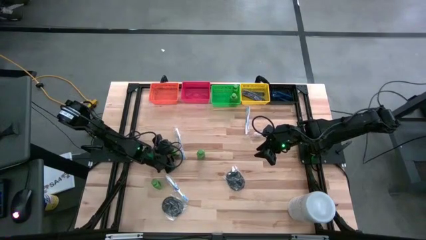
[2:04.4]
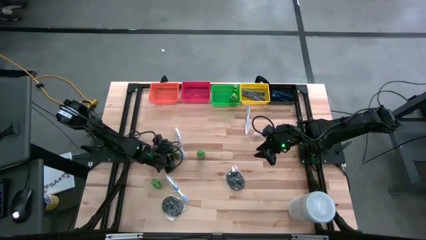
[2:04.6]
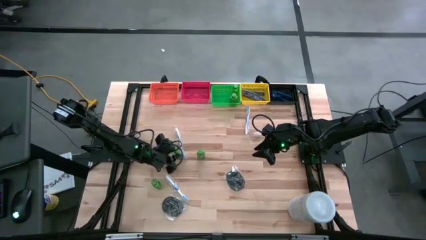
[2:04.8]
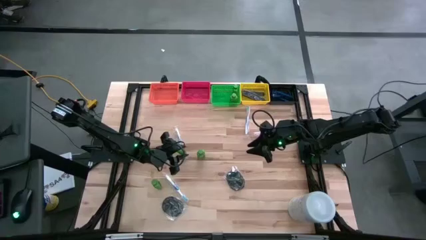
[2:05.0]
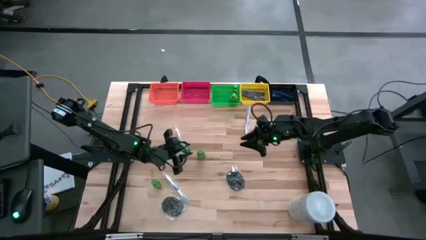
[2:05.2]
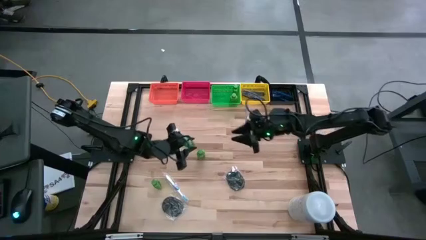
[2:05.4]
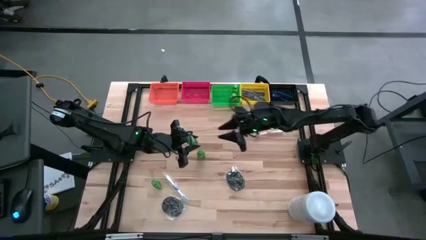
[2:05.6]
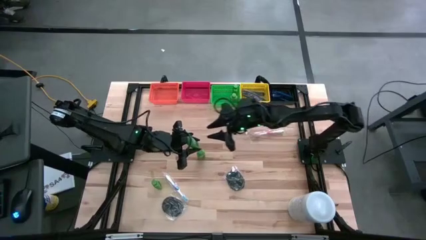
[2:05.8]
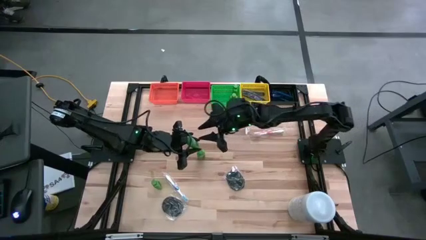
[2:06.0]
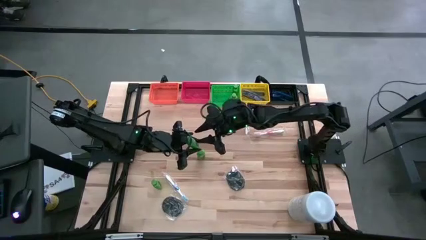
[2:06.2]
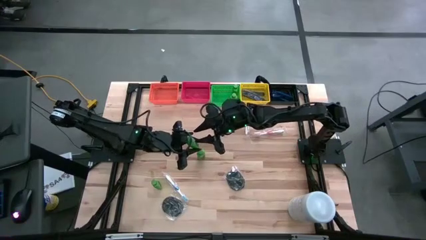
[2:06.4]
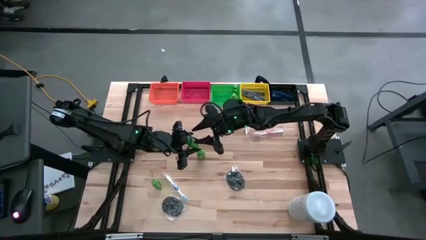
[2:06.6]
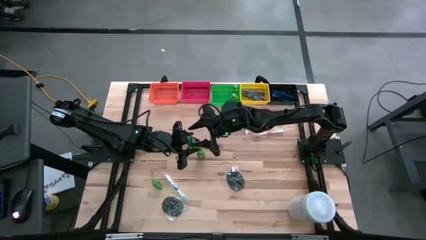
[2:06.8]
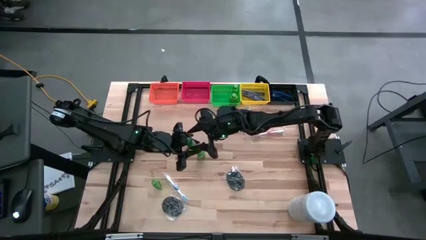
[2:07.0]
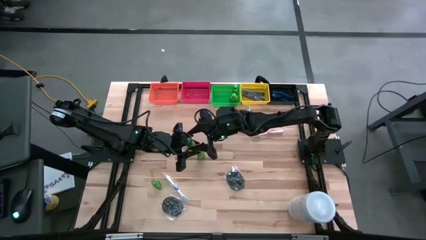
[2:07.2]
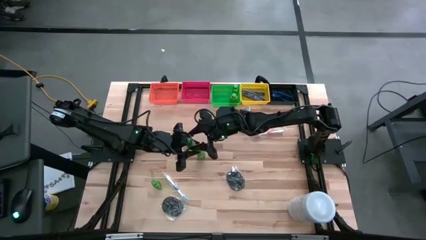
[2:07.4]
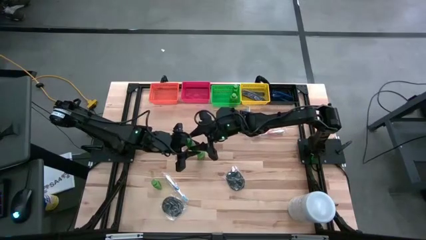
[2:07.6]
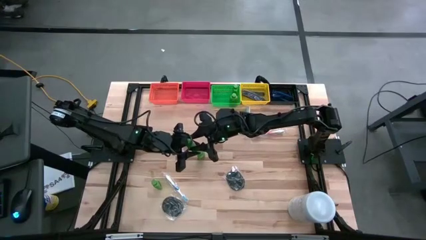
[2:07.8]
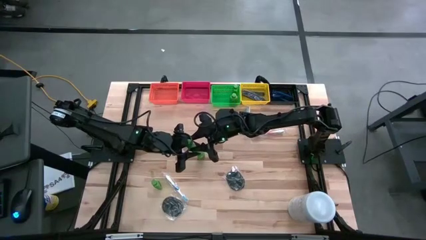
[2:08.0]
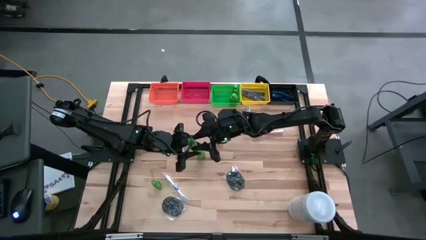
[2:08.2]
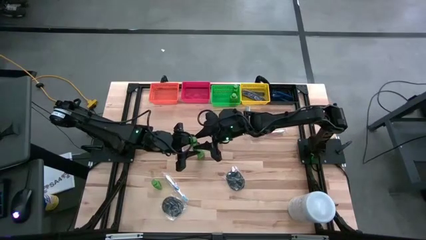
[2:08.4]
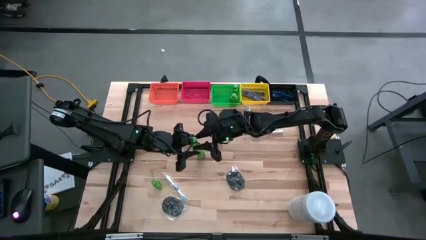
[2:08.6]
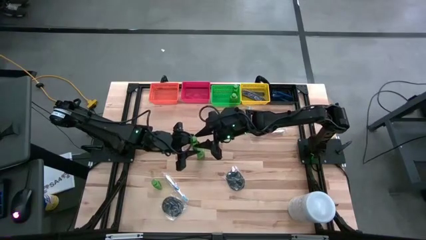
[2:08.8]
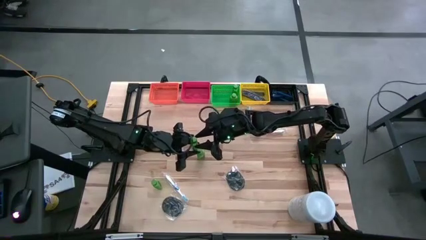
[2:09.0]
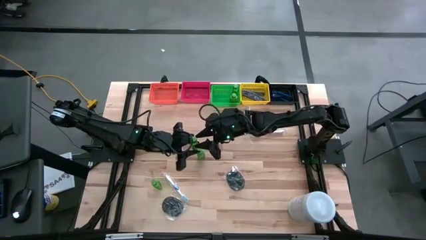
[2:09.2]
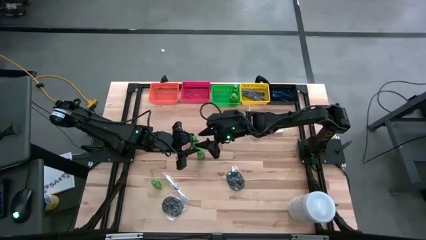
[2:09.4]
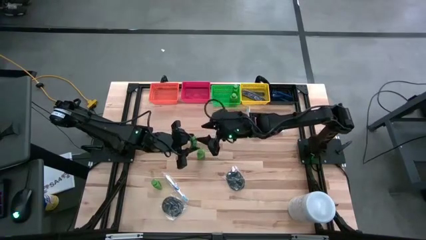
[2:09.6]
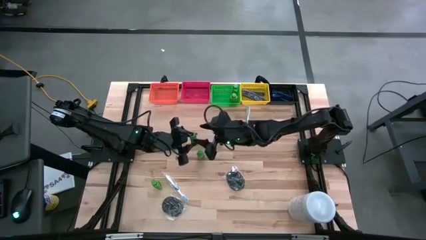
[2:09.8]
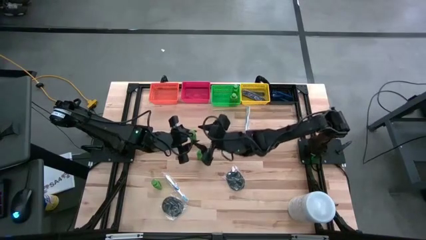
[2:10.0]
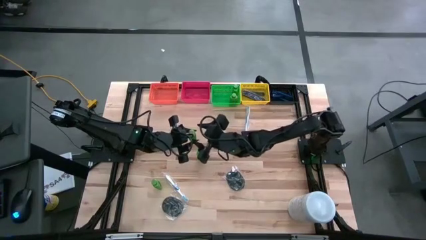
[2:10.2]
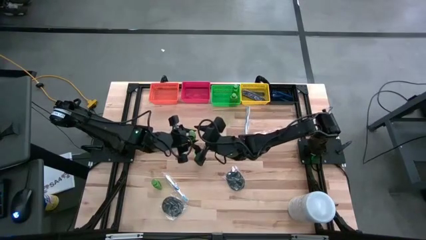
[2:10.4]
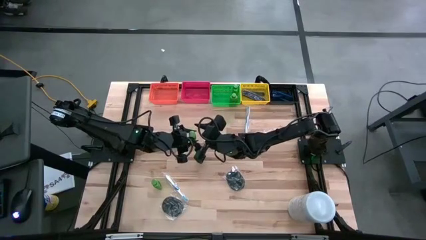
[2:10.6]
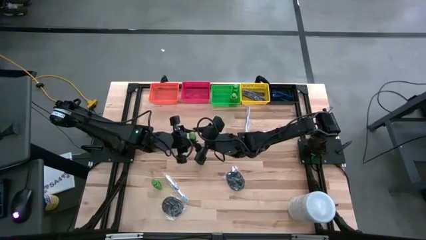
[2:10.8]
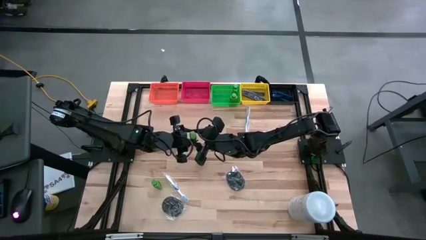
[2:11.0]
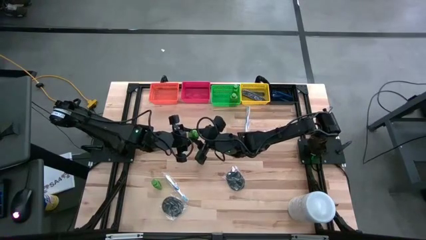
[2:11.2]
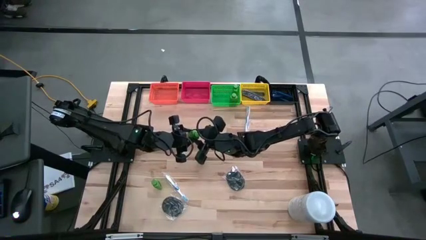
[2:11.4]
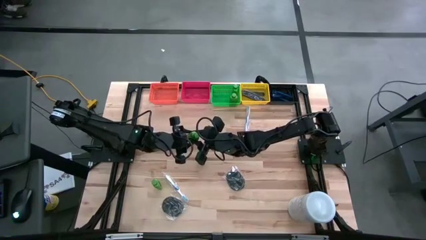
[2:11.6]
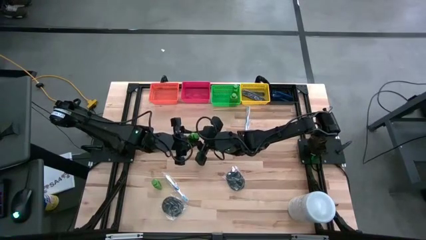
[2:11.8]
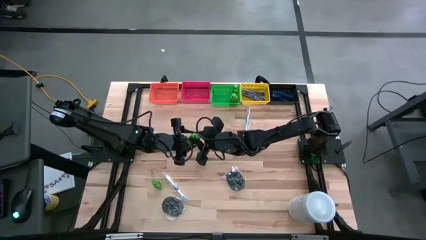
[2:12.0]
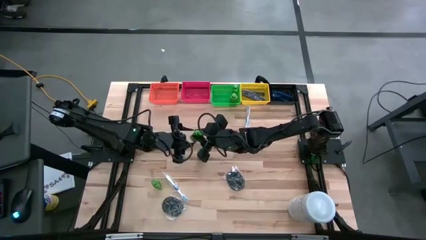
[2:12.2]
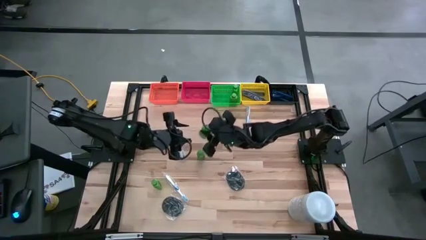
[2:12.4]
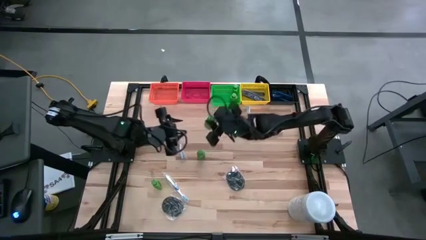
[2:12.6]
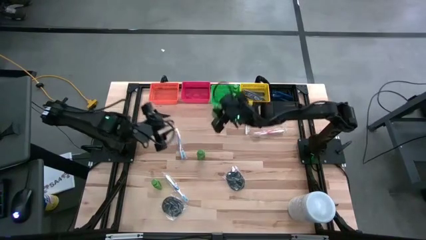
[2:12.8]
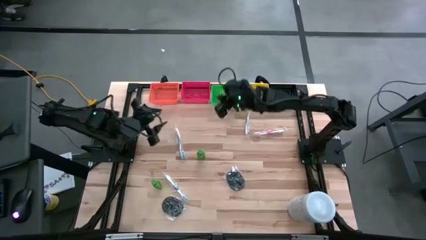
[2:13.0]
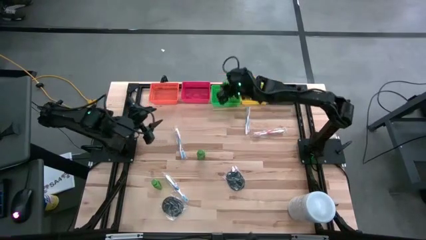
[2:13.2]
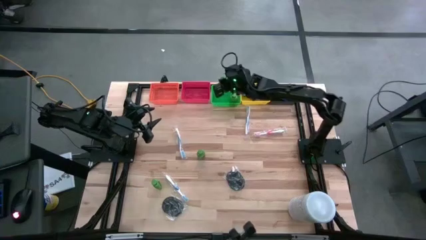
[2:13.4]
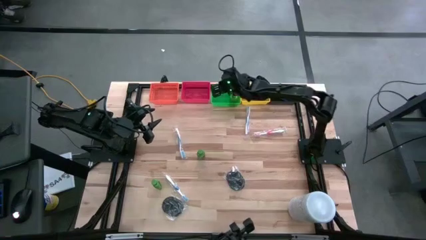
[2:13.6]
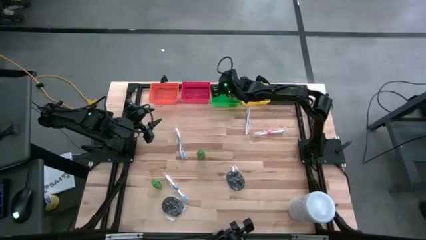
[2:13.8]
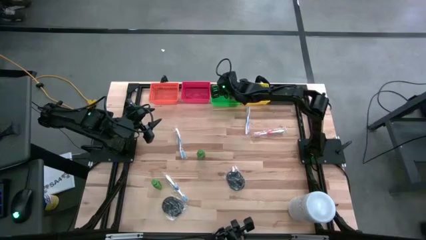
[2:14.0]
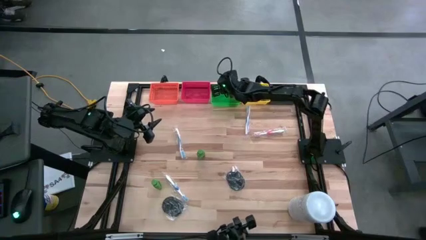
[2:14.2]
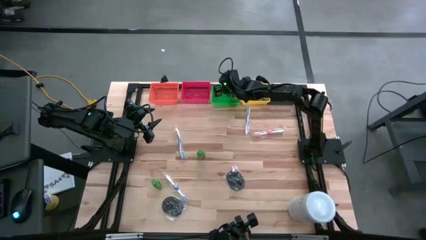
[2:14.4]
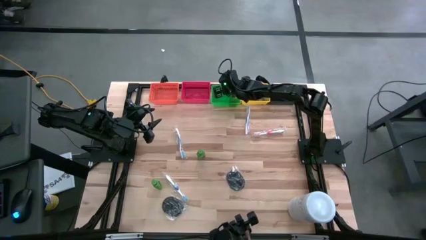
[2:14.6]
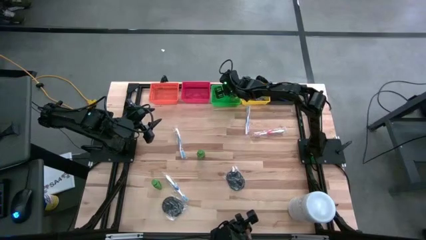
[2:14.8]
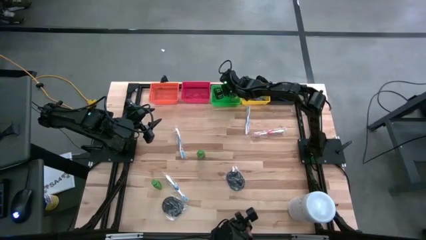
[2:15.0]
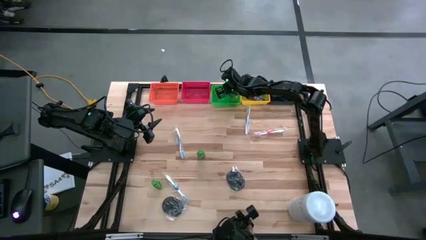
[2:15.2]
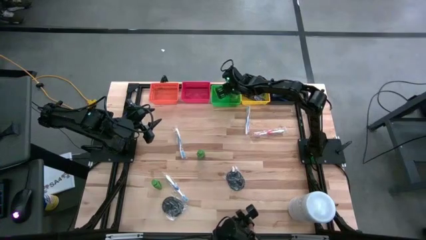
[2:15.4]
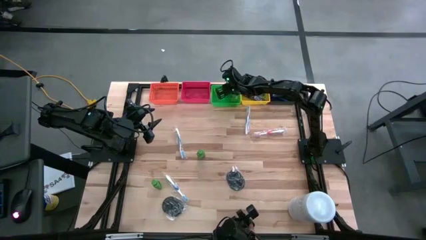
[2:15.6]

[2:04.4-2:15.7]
Task: Pick & Place Travel size toiletries
Put the green shampoo into the green bin

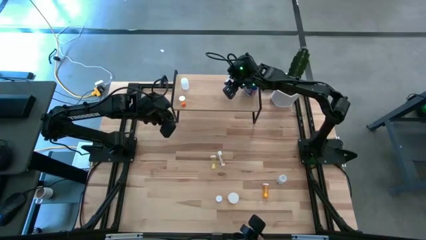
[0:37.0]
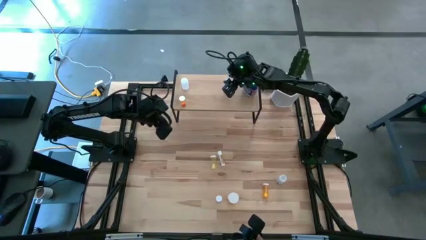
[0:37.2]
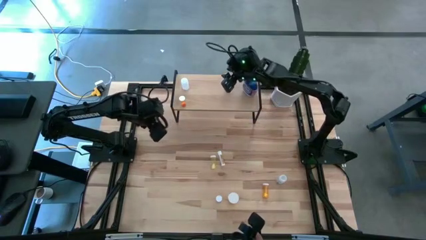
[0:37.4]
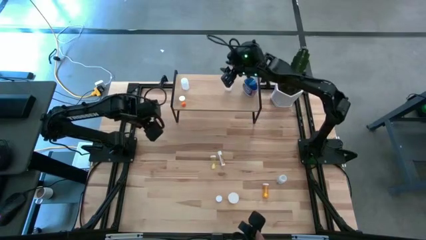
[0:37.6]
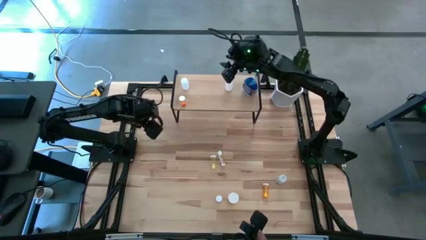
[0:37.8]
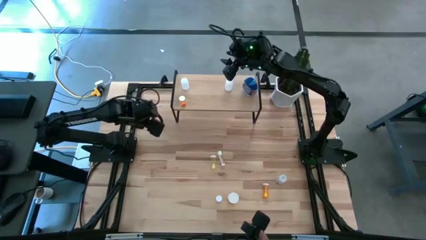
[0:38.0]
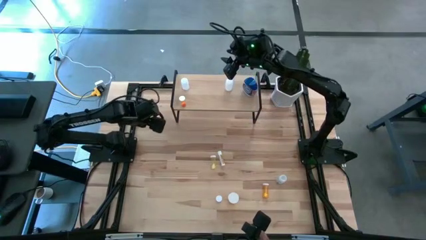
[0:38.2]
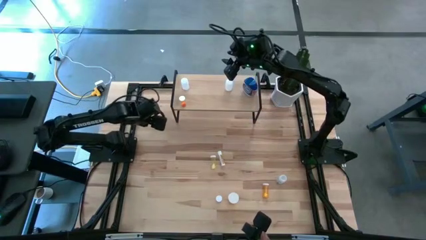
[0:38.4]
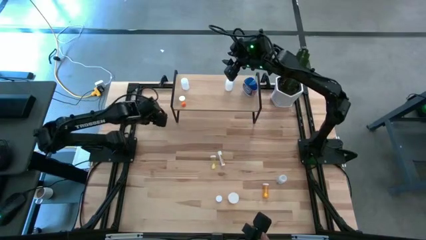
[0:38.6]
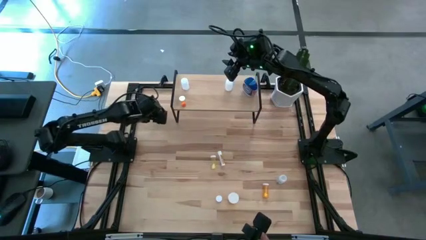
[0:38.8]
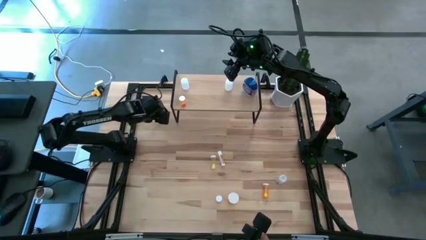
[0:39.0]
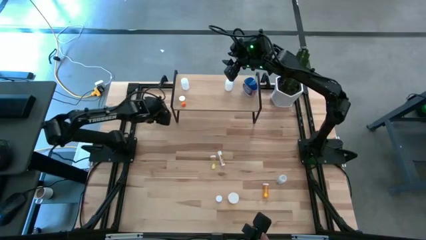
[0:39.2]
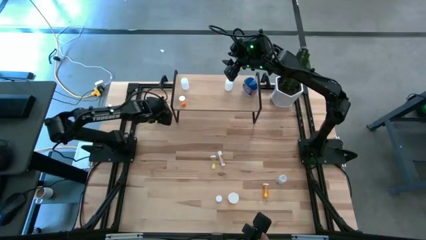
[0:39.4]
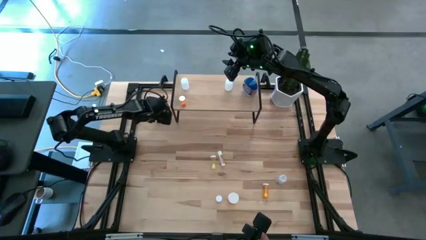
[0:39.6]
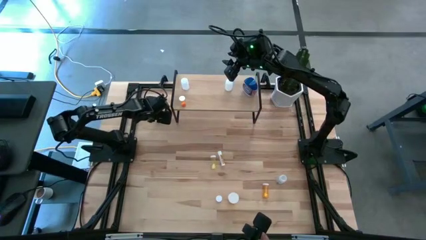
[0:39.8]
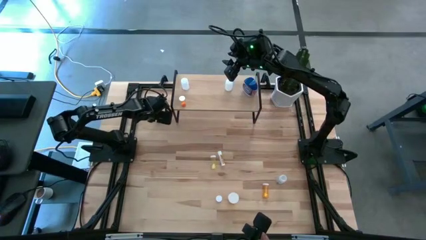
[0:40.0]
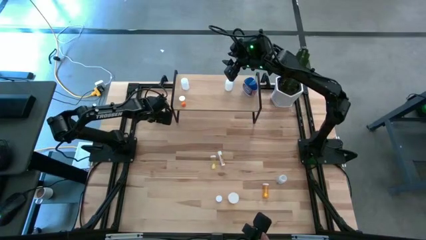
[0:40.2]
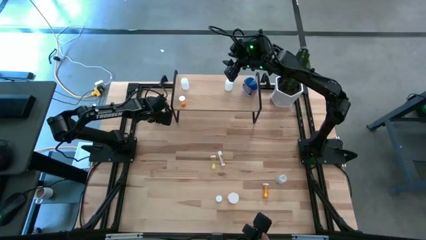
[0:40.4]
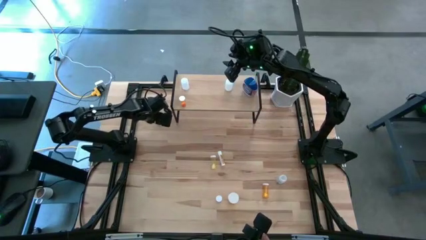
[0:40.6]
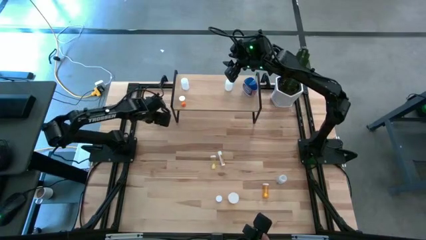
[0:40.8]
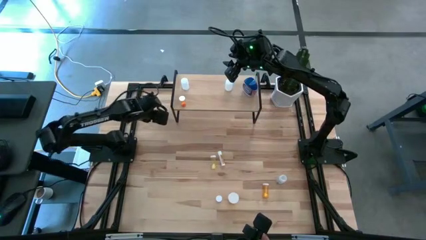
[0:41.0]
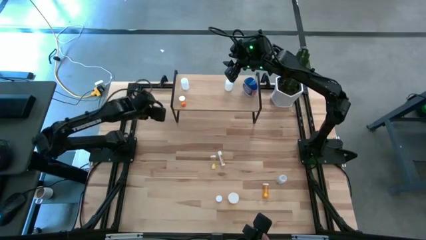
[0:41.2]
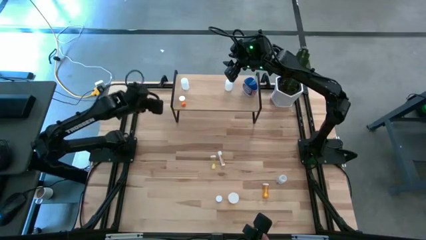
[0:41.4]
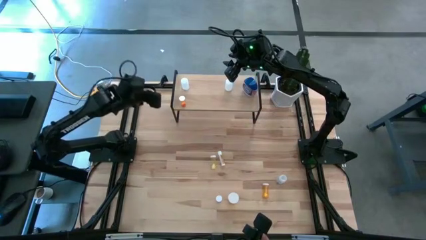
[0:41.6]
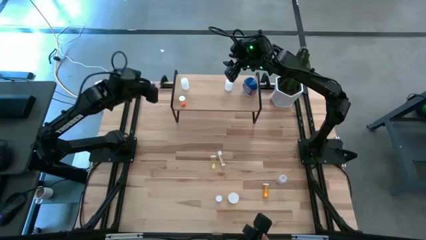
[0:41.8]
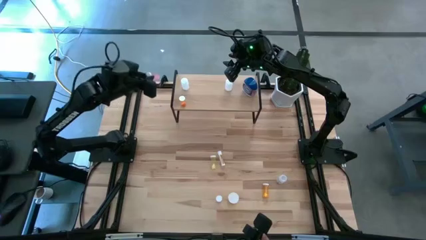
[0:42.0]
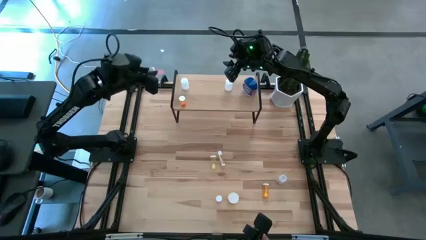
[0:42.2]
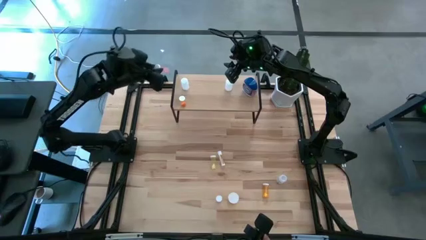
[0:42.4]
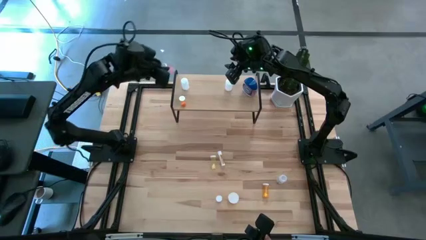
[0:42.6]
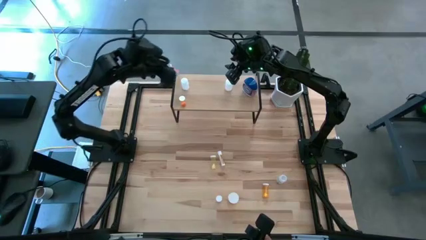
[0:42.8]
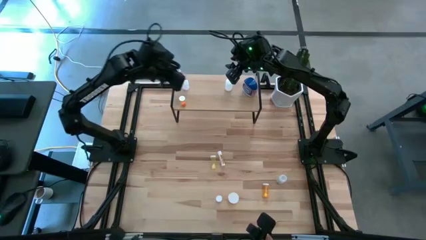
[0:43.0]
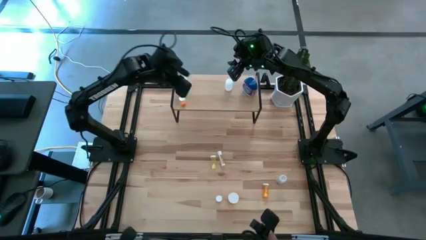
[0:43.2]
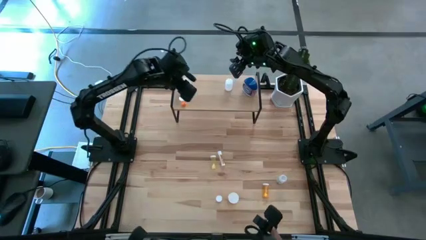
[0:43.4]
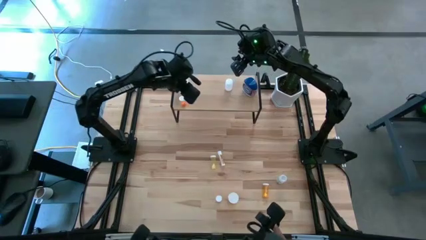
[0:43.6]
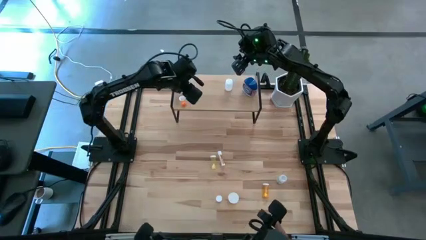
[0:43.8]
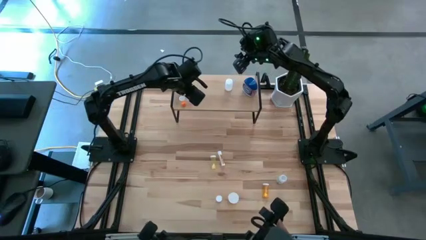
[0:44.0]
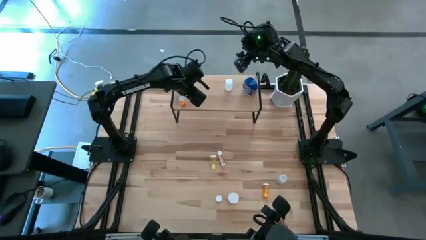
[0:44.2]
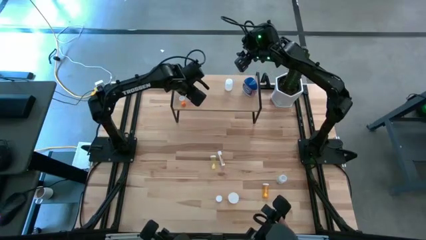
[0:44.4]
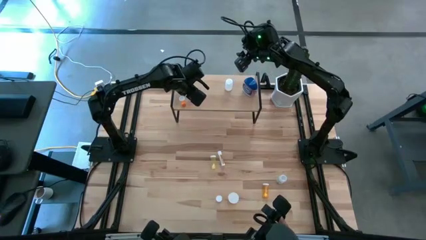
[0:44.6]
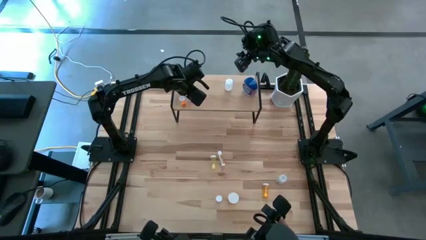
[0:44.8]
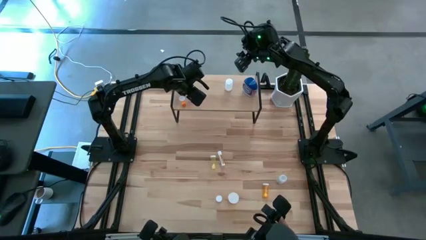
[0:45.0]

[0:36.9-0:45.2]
Task: Pick and place medicine bottles onto shelf by color
Put the top pink pill bottle on the shelf
